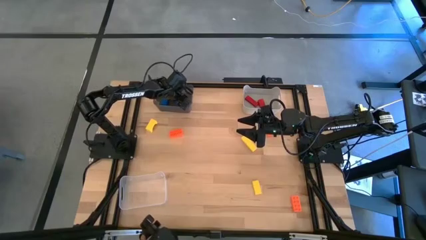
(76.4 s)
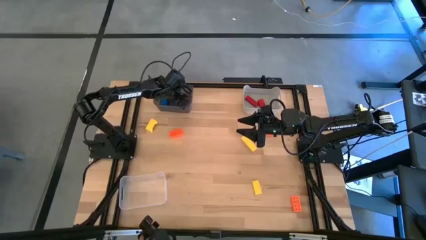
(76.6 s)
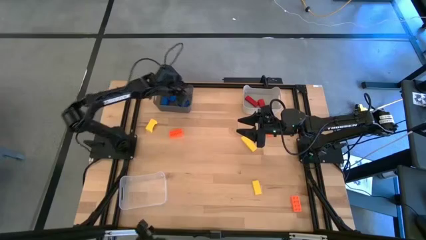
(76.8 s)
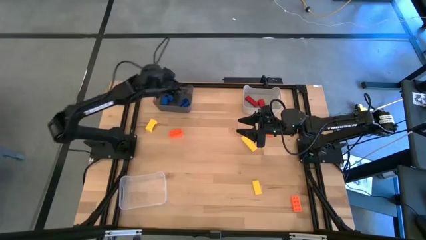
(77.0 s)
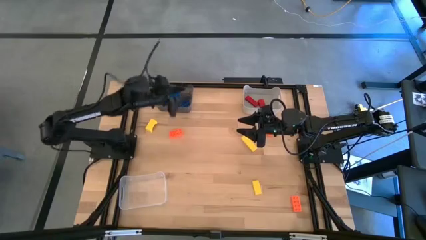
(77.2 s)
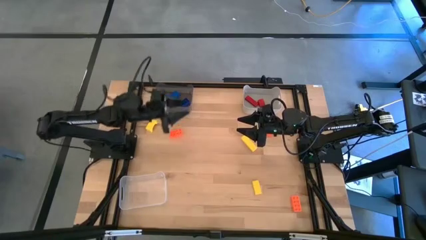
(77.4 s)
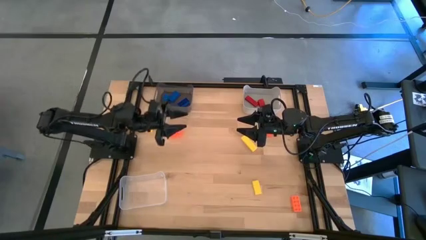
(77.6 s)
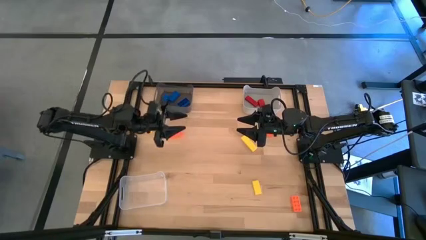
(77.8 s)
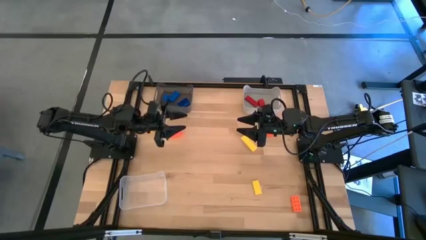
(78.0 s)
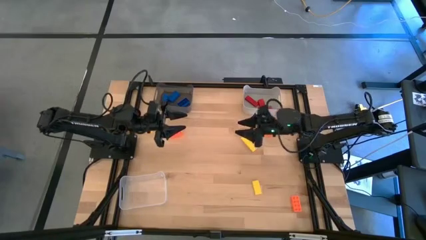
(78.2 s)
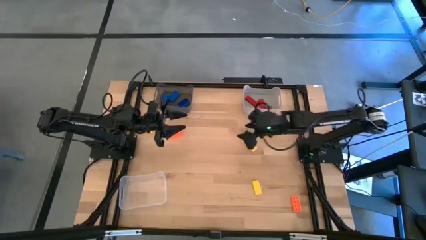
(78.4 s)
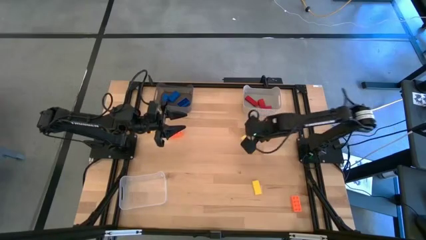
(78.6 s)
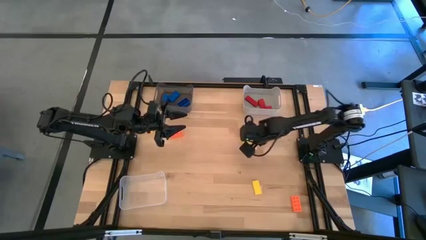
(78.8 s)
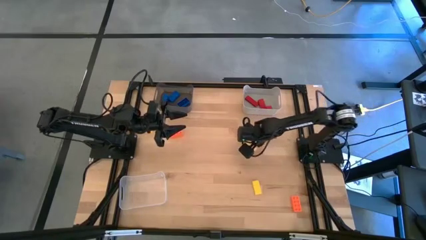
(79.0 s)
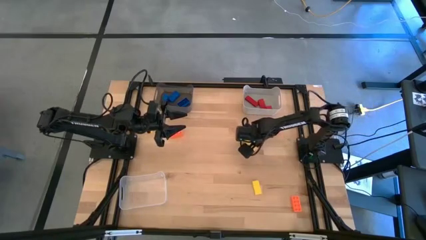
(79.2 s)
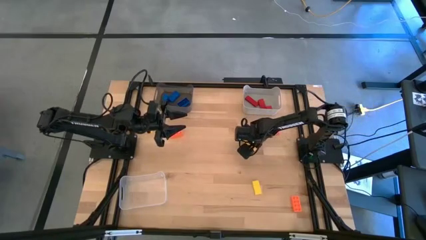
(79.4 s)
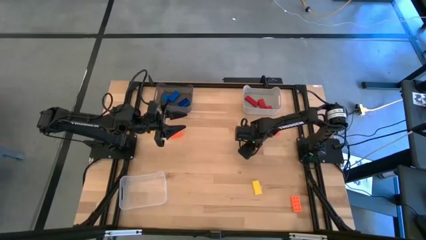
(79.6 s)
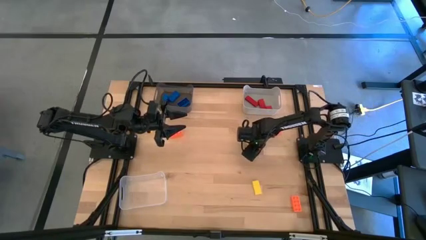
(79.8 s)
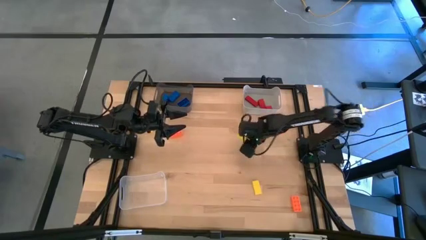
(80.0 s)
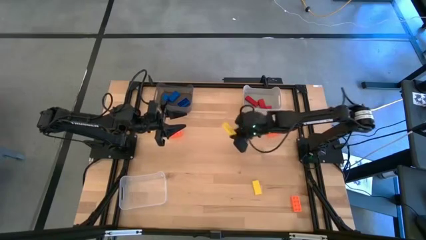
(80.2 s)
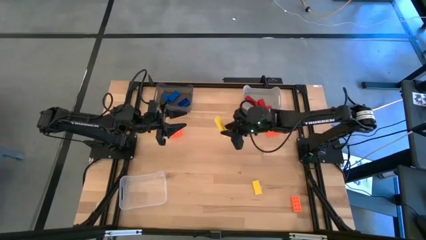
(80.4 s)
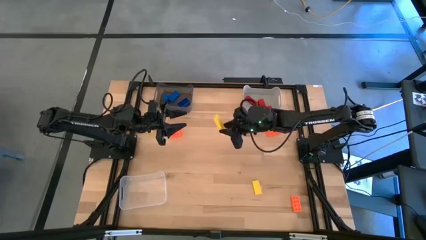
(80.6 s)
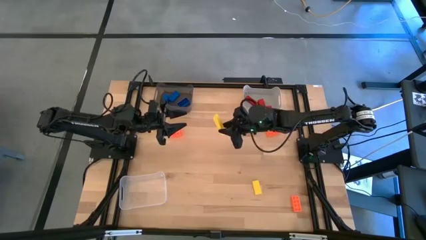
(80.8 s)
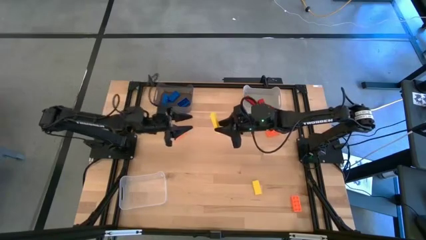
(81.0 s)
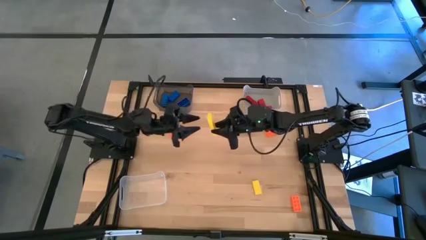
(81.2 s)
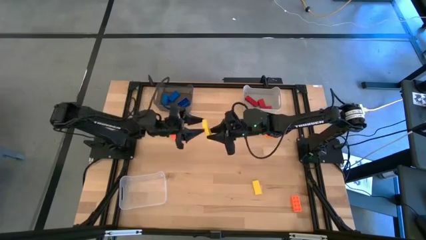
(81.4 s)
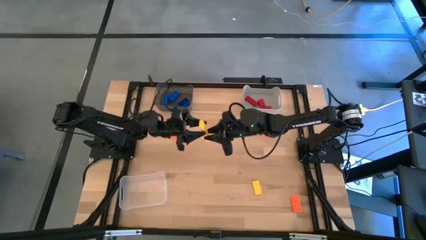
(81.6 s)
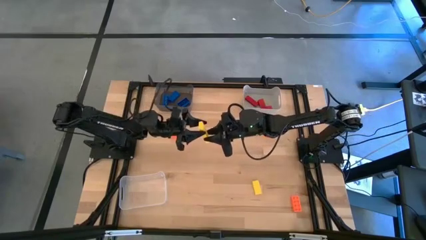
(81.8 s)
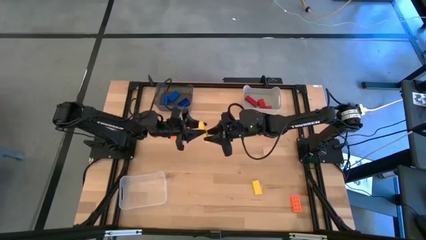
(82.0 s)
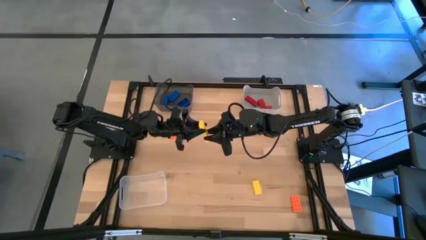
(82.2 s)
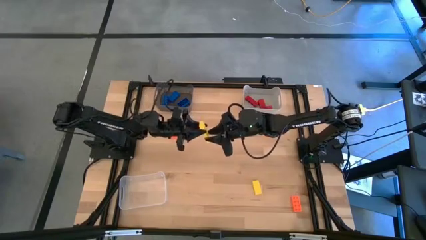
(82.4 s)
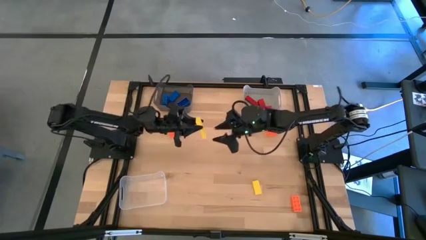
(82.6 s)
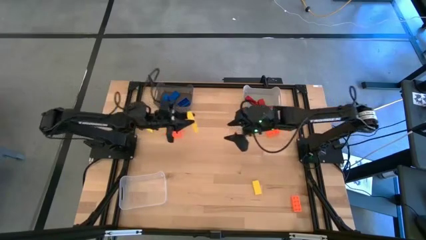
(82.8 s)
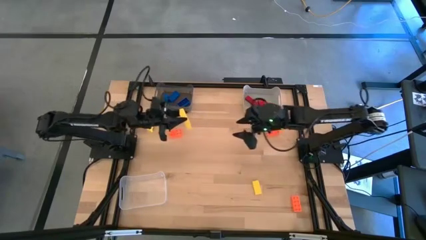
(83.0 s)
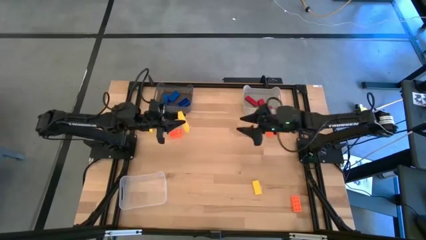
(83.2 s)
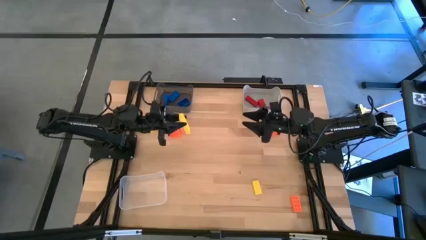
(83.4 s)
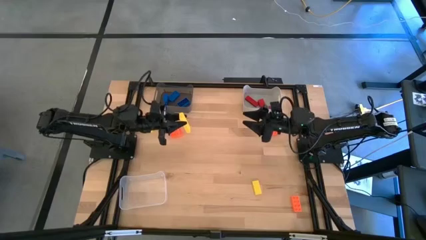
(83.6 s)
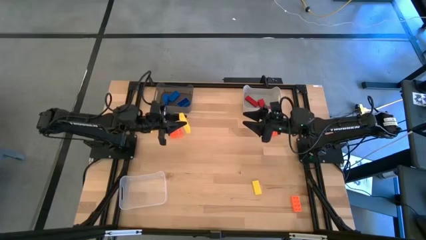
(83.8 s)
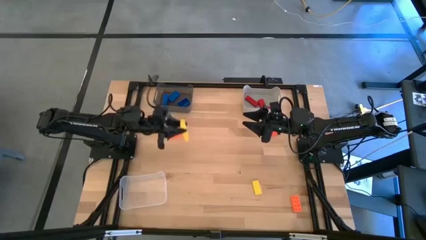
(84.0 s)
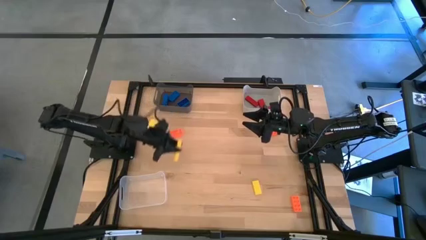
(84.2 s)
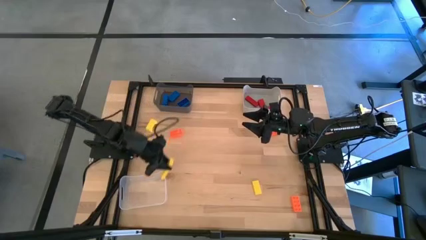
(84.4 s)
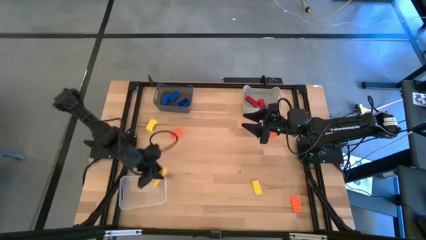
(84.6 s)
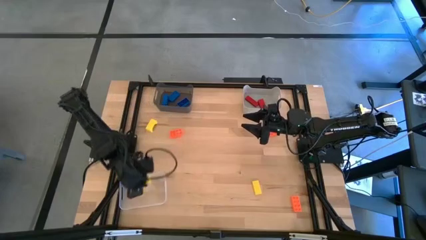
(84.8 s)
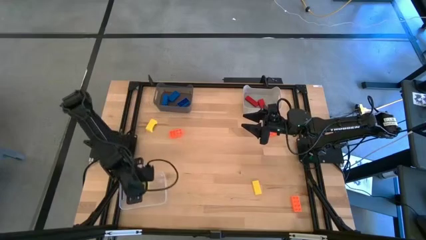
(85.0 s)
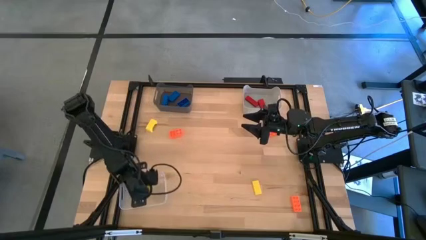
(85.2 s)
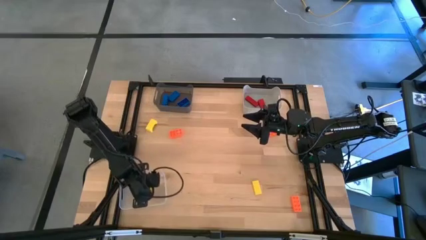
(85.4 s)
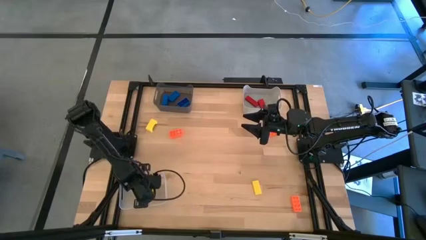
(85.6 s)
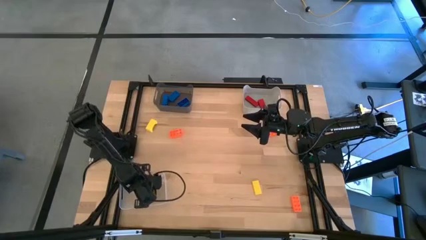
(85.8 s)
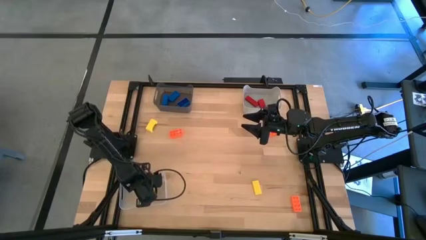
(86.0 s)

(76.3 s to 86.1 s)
Task: Sort & place blocks by color
Put the yellow rectangular block into the white transparent bin

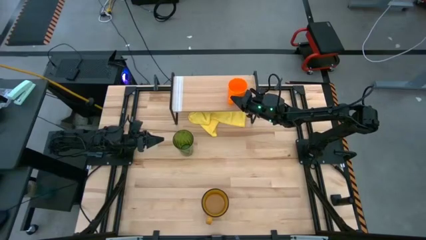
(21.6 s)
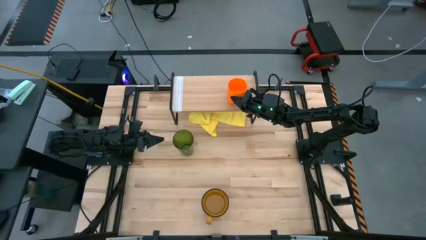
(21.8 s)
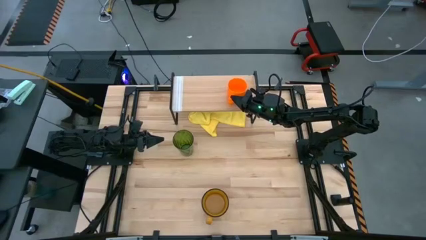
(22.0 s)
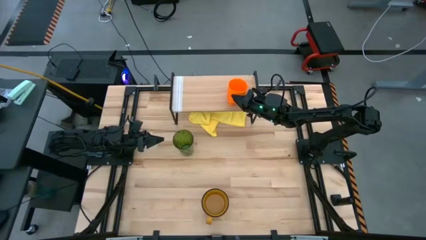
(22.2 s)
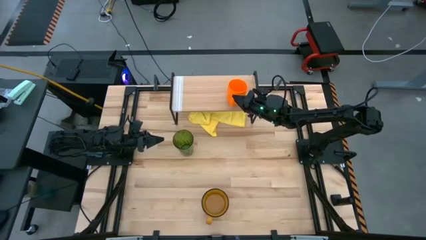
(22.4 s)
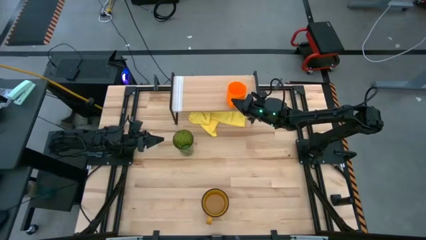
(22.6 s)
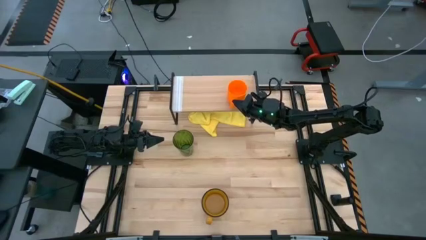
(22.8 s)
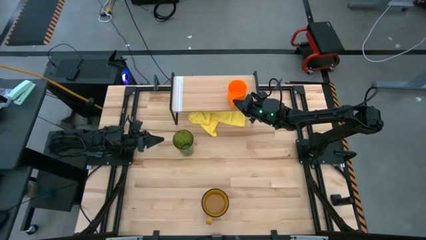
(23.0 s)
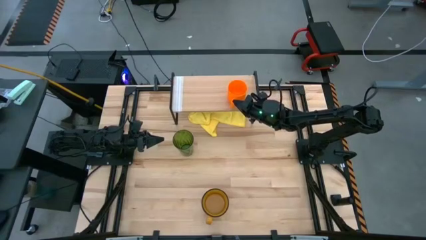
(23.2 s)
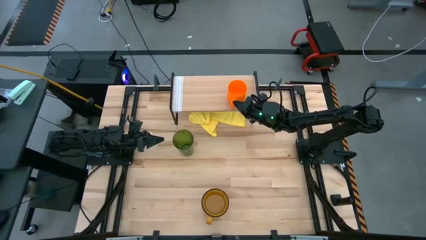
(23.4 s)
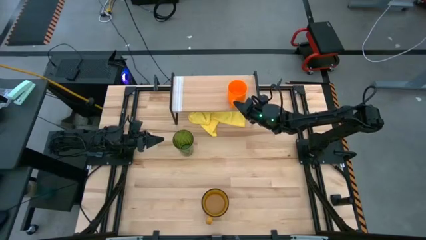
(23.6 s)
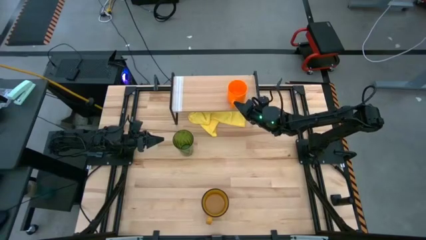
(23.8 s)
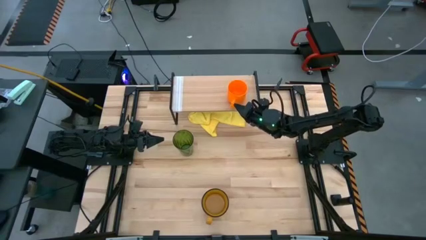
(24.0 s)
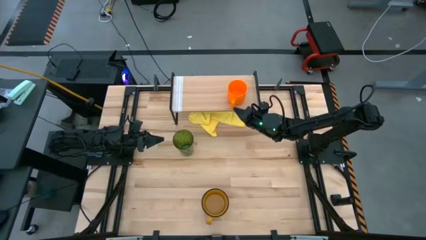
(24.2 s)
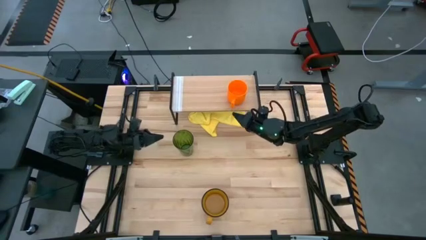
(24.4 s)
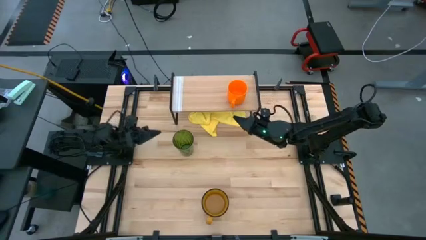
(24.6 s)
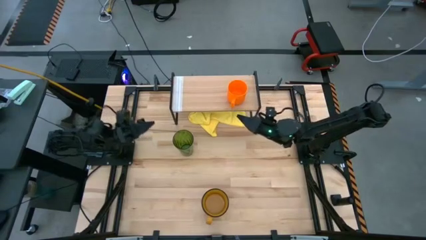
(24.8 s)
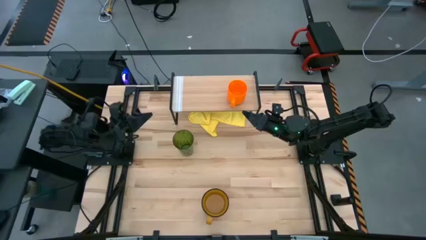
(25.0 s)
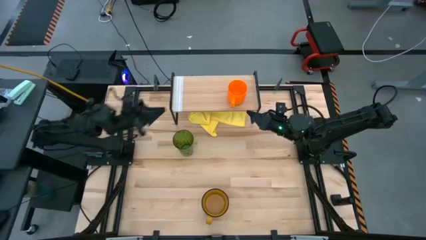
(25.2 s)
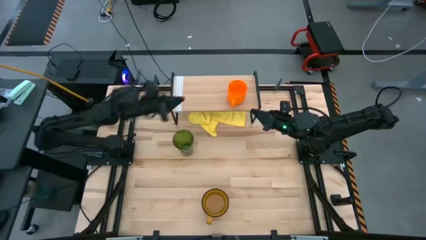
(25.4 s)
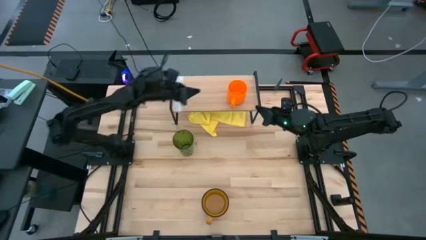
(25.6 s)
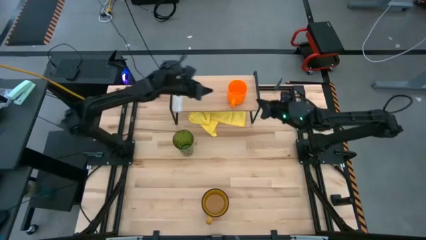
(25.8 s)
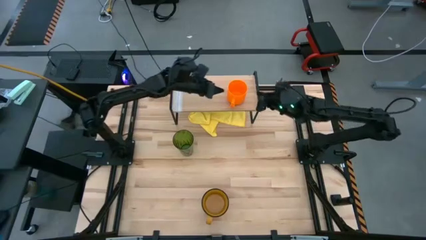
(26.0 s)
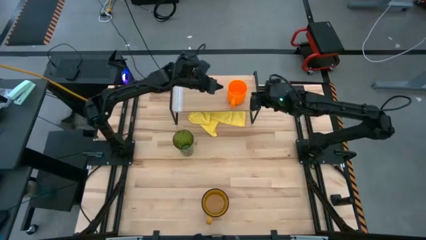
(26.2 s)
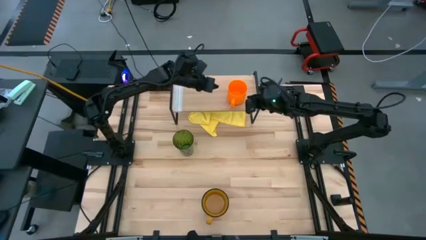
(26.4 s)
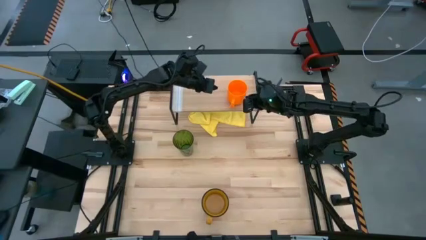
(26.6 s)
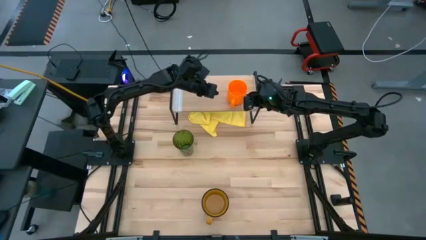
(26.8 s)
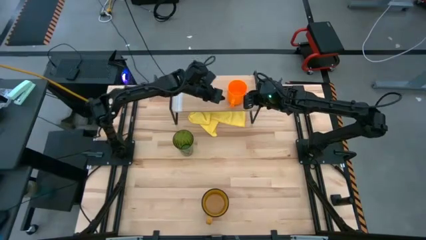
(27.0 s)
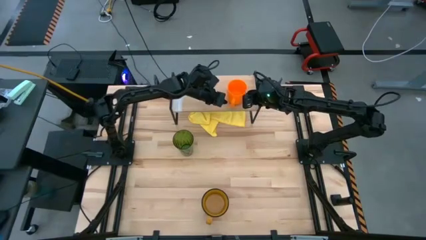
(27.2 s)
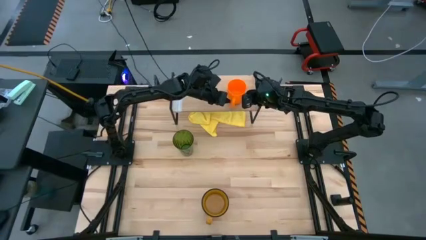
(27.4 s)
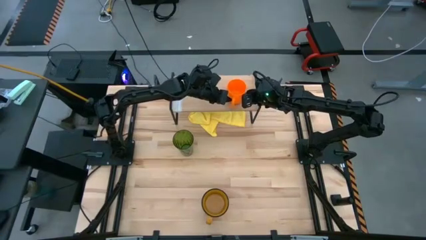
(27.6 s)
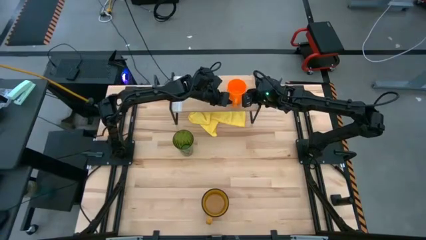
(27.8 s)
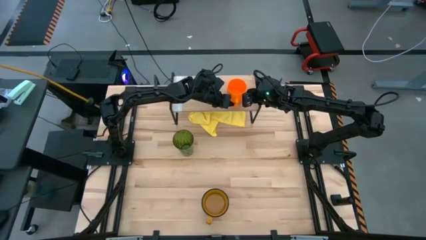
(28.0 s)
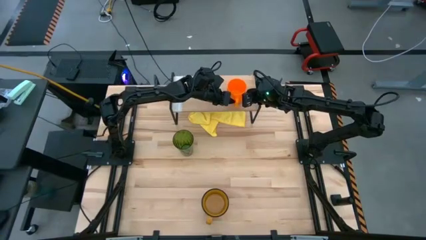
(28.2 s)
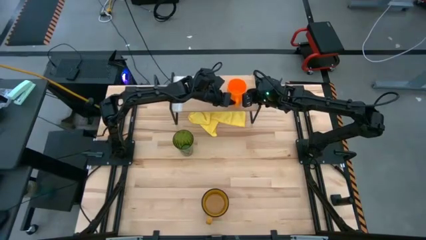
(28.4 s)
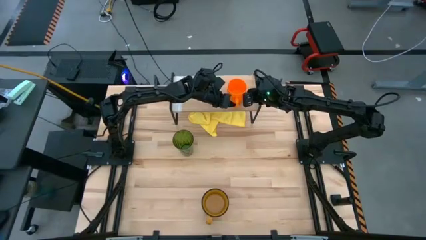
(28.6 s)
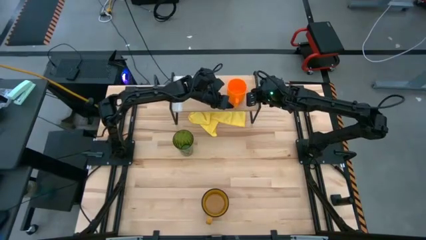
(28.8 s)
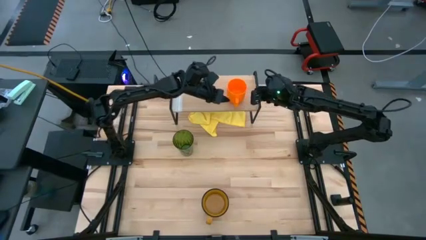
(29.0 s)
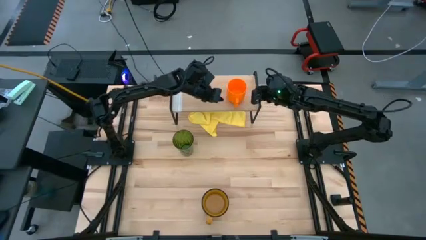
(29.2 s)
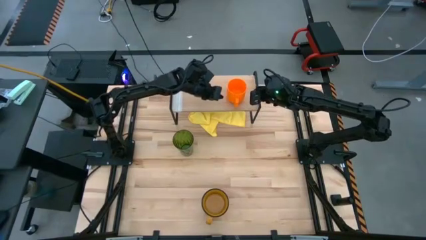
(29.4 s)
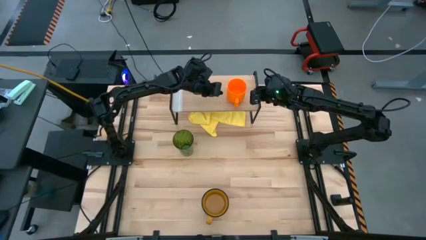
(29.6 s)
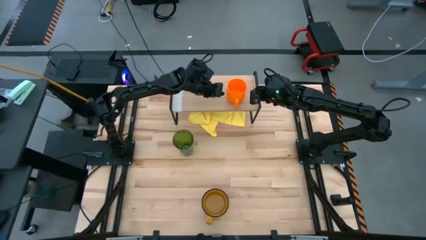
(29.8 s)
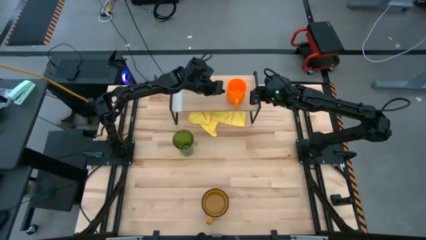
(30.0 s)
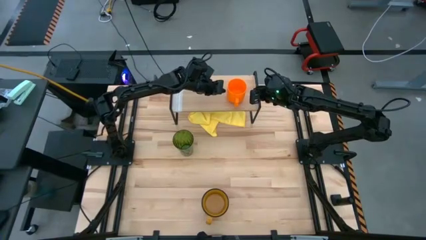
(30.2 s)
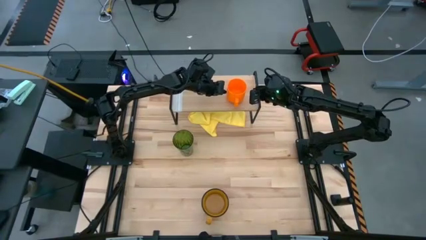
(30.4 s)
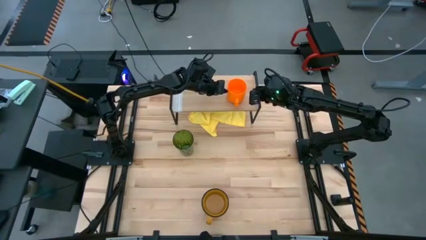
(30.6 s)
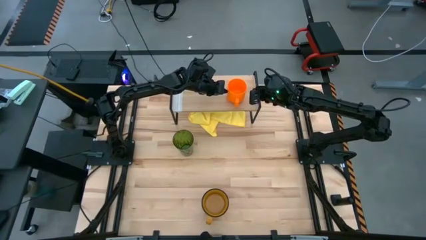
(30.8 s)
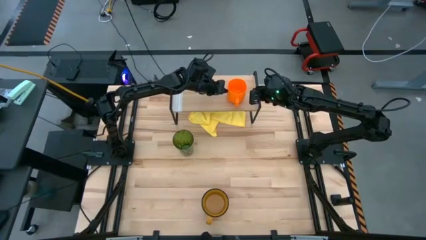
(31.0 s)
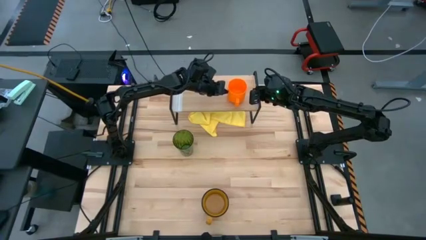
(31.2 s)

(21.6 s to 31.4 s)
Task: Stack small to large cups/mugs on shelf
Put the orange mug on the shelf
